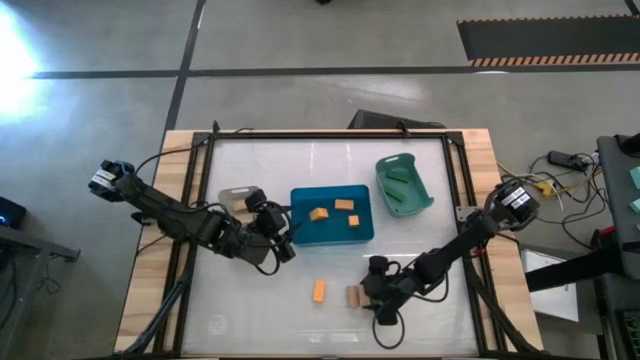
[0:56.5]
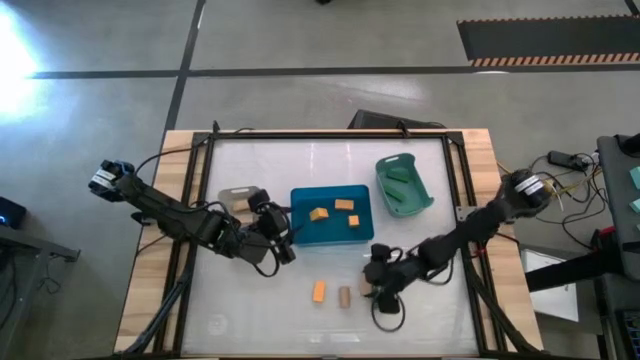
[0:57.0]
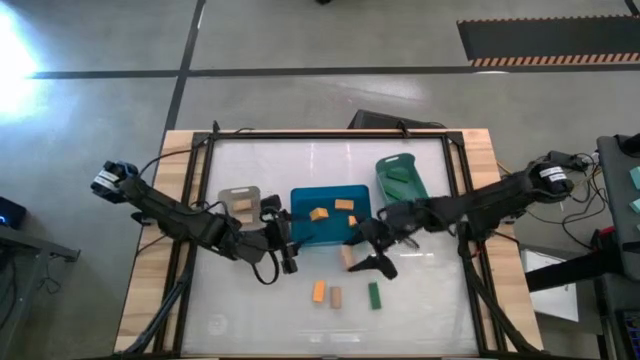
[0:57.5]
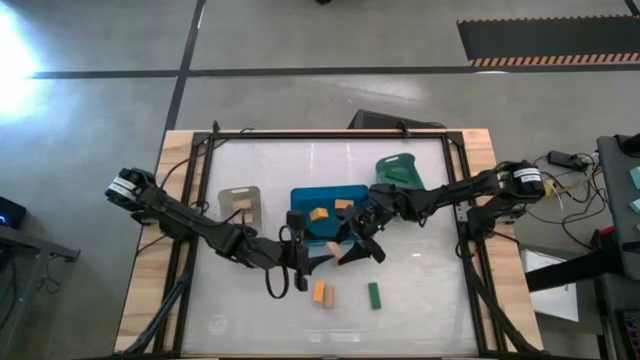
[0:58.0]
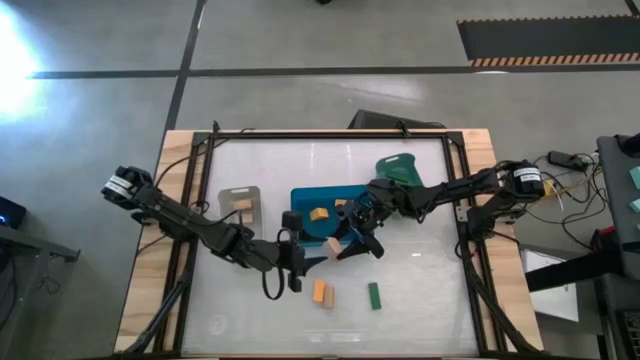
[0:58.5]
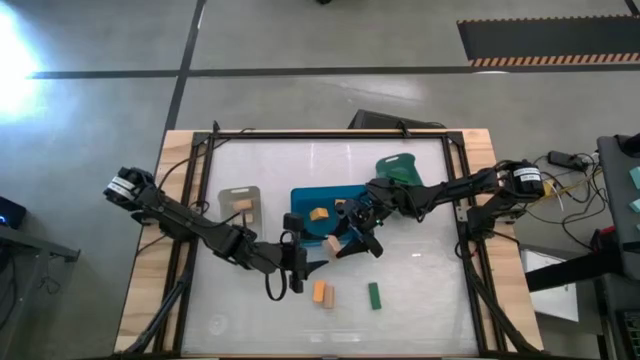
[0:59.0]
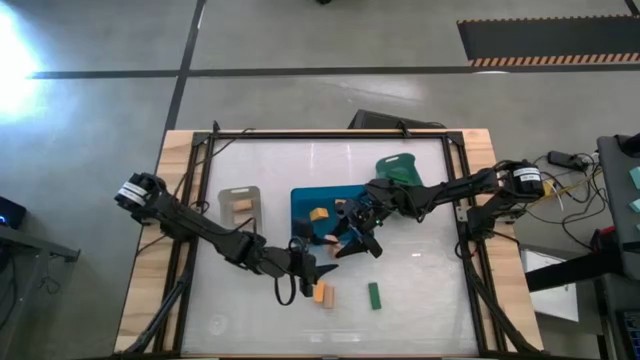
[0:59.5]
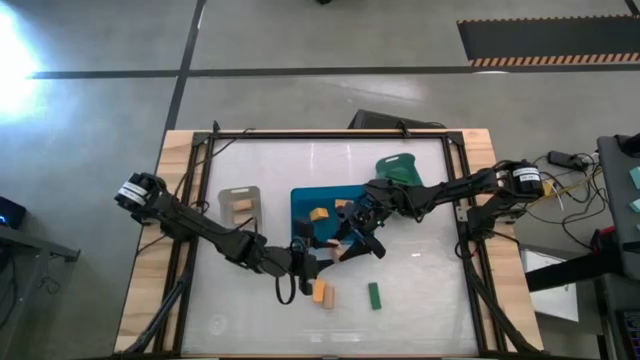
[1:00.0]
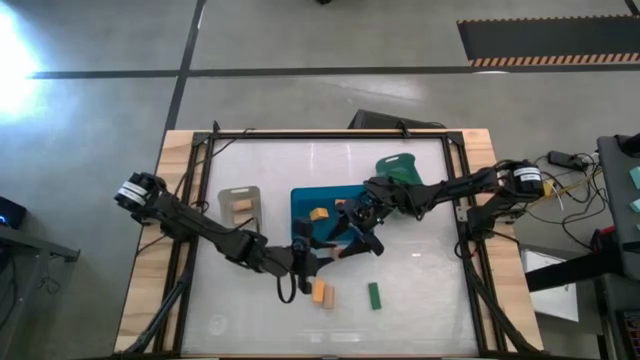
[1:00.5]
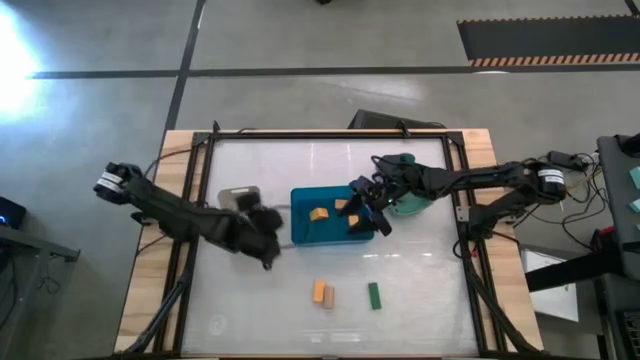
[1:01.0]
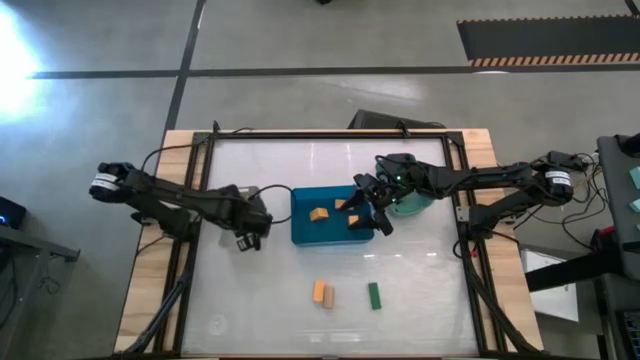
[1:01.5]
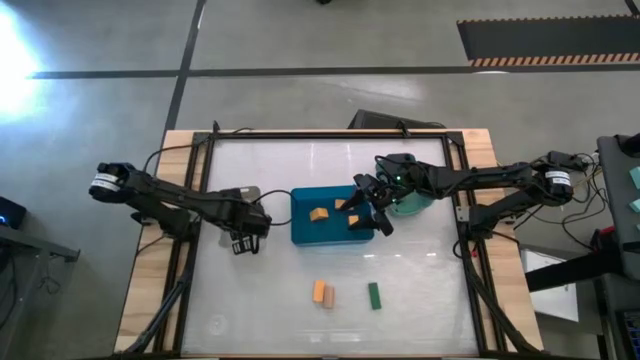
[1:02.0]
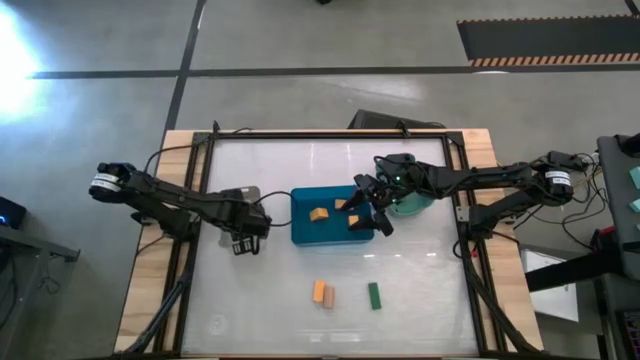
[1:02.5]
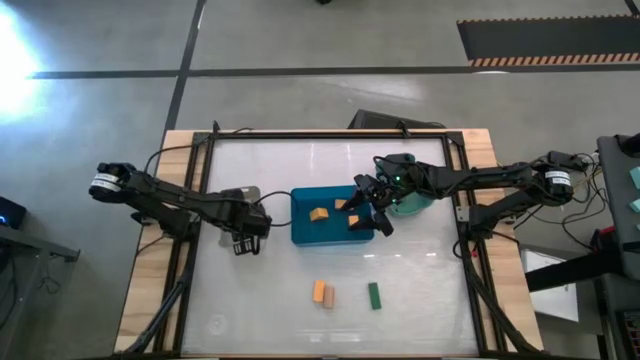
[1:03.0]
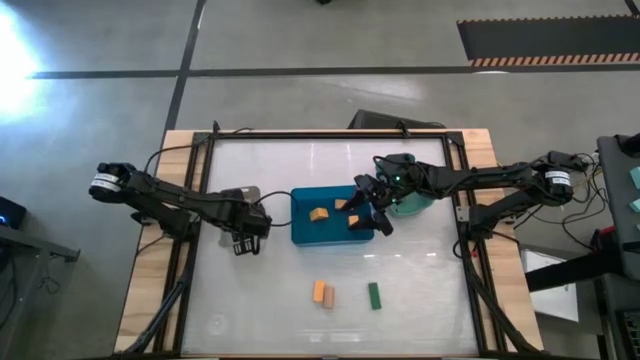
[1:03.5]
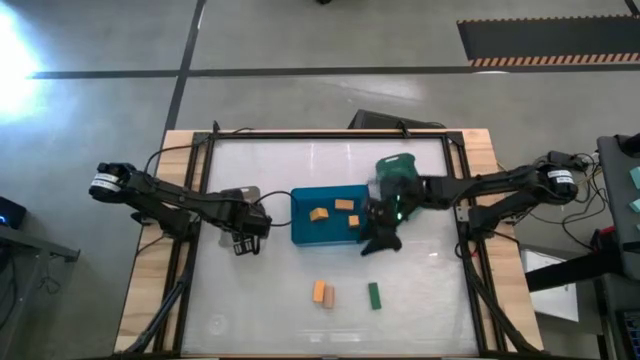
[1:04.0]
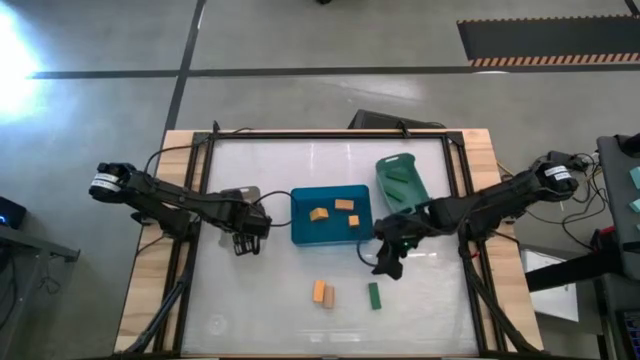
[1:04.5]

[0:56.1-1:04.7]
Task: Sort & place blocks by color
Put the brown block into the gray bin

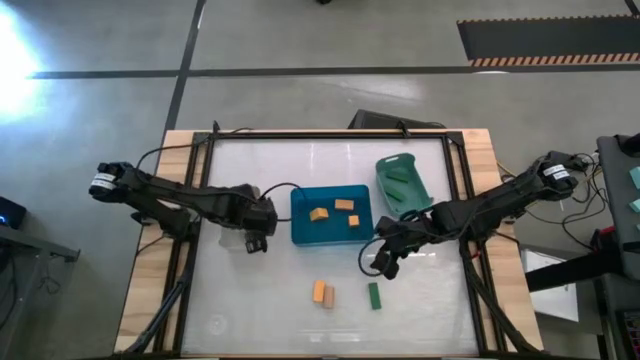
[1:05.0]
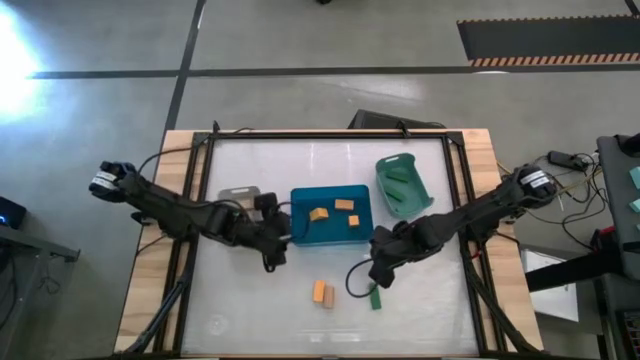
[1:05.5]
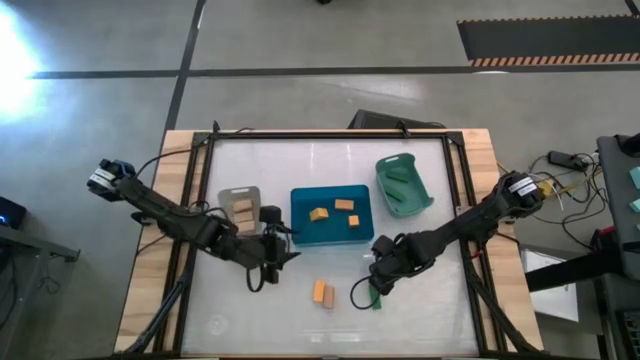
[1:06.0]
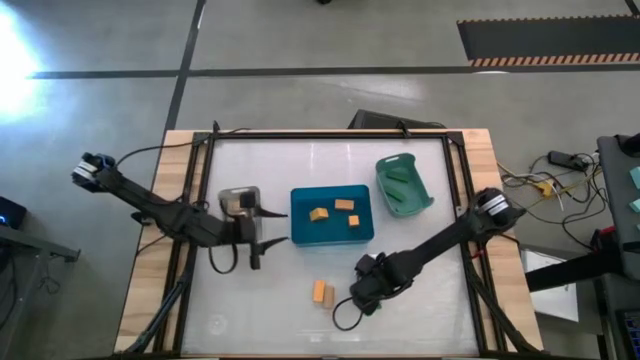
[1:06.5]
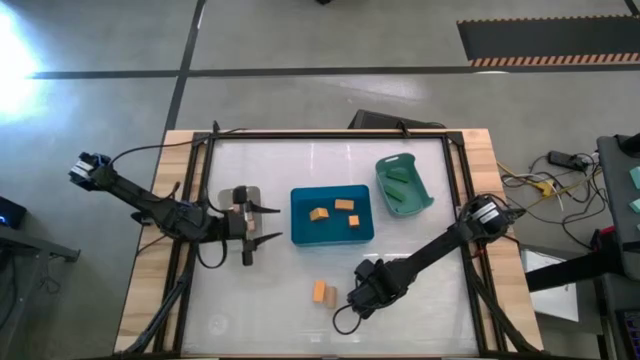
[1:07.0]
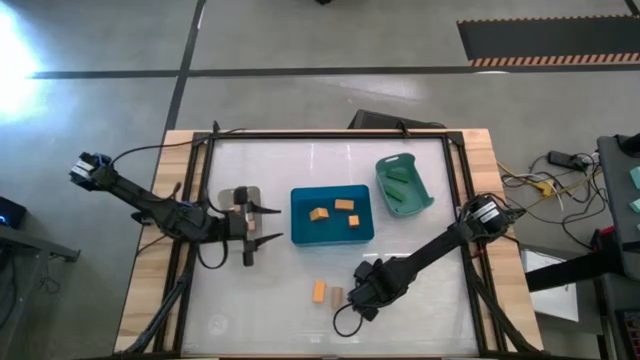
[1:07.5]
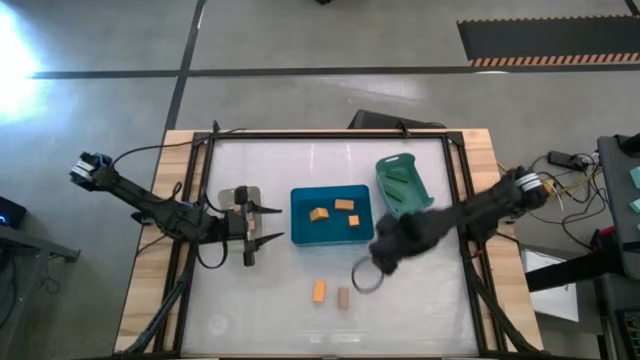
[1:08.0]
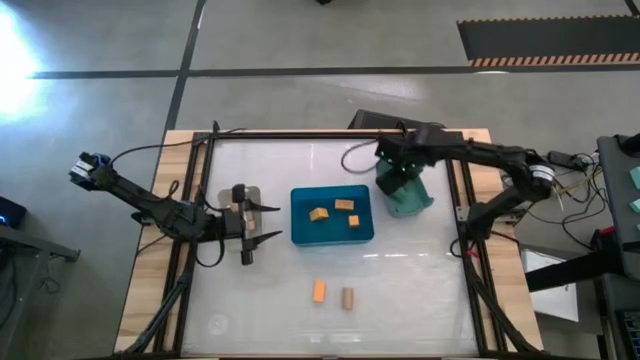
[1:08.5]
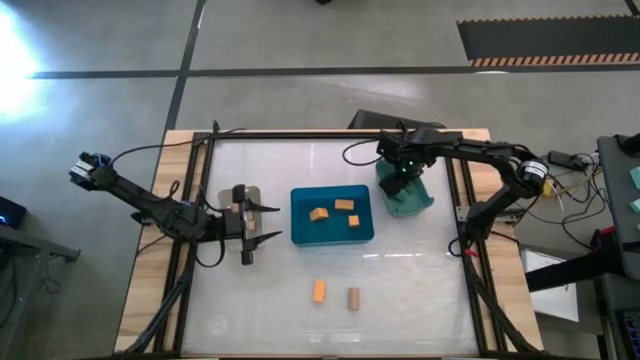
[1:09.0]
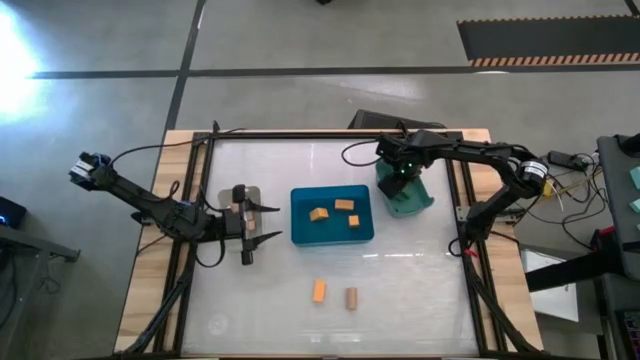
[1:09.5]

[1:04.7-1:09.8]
Put the green block into the teal bin

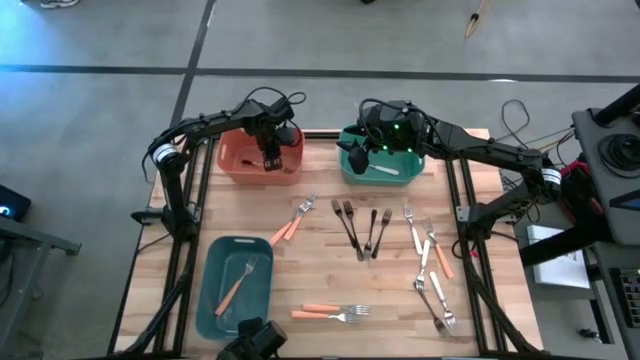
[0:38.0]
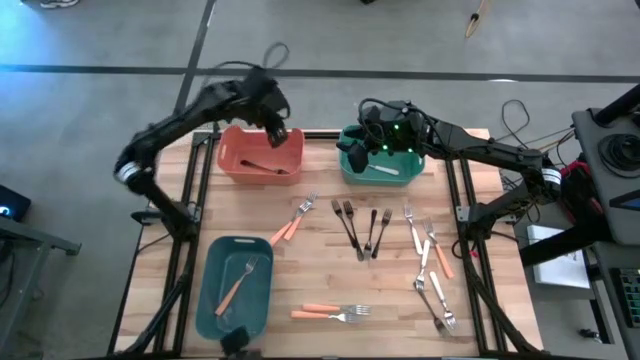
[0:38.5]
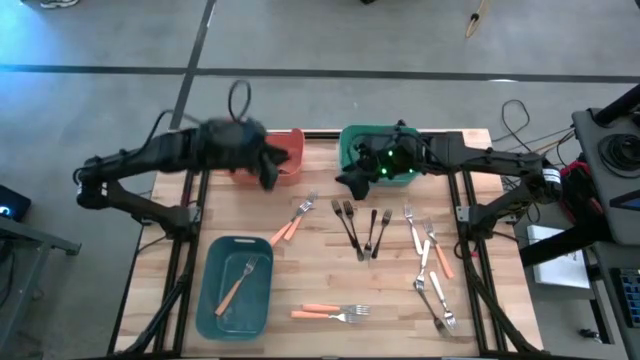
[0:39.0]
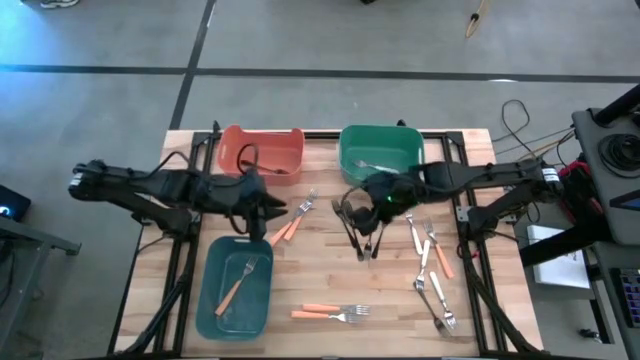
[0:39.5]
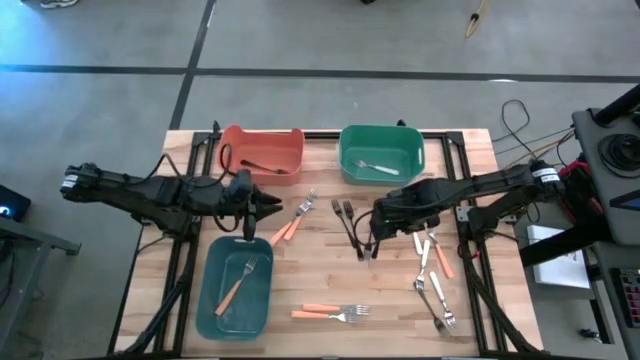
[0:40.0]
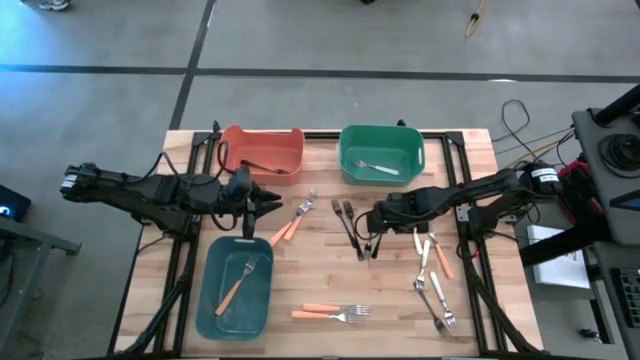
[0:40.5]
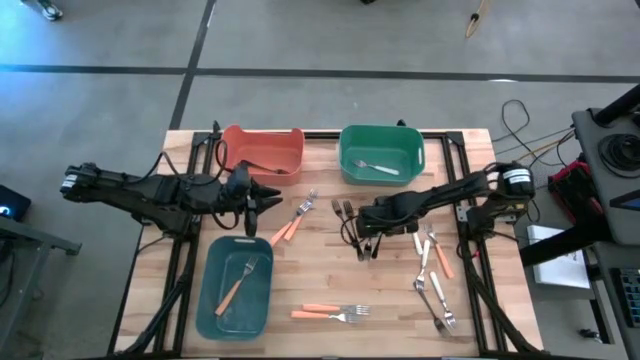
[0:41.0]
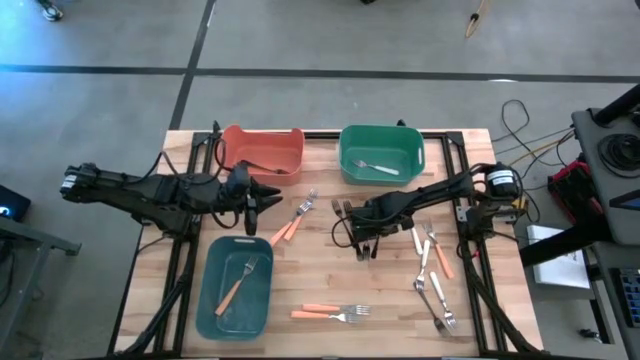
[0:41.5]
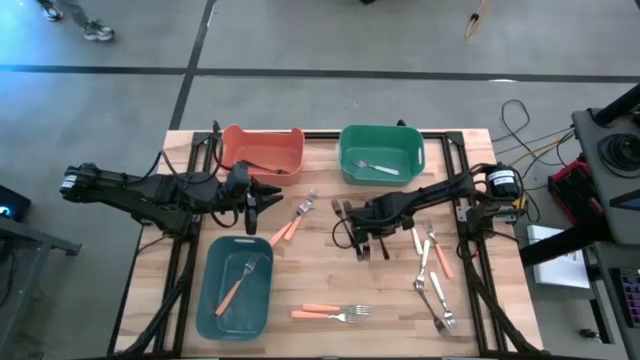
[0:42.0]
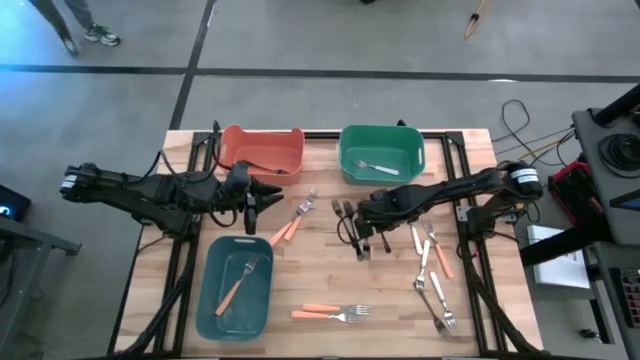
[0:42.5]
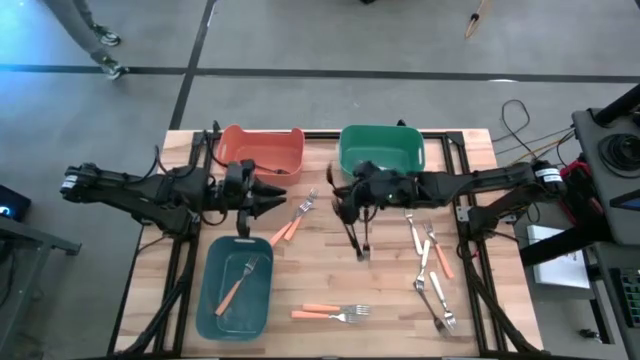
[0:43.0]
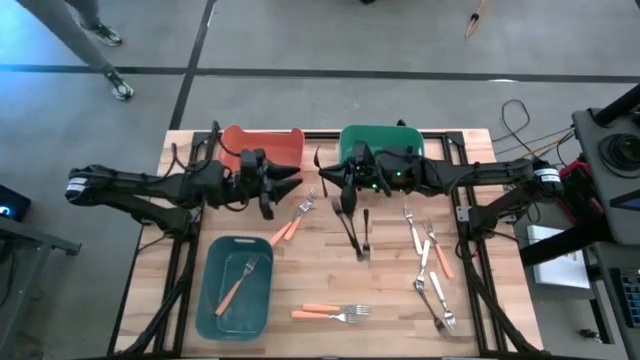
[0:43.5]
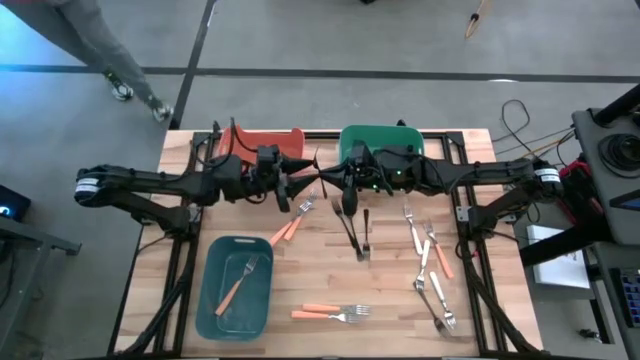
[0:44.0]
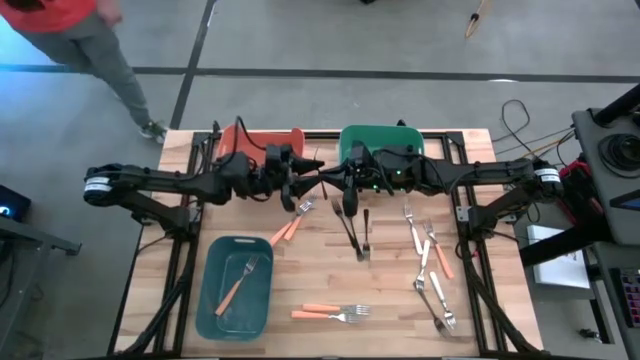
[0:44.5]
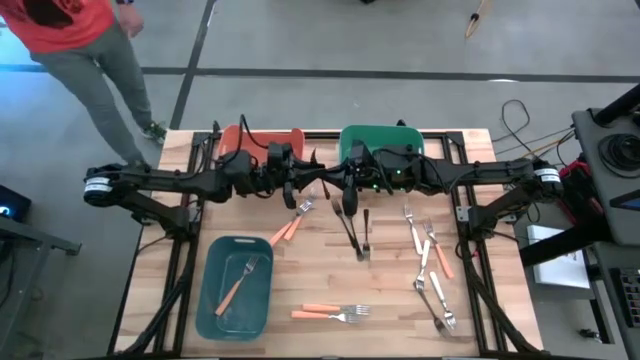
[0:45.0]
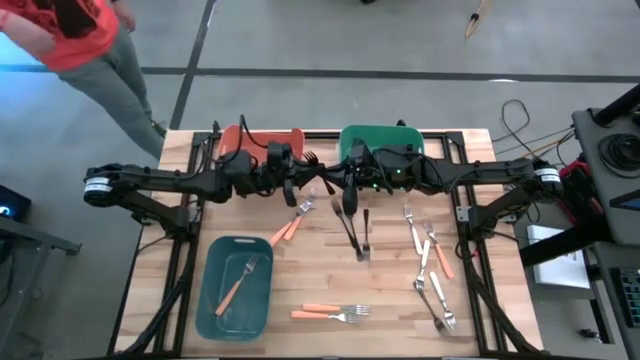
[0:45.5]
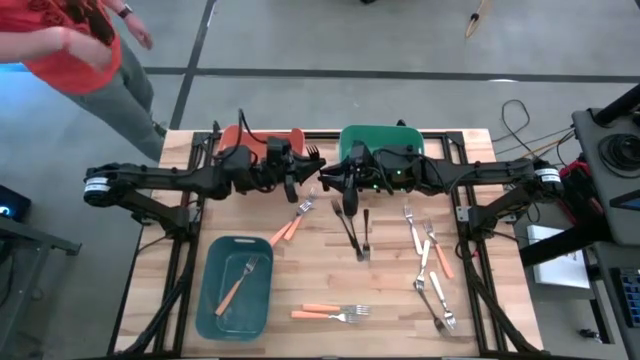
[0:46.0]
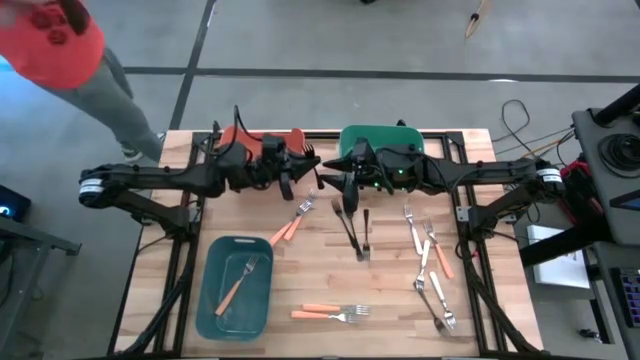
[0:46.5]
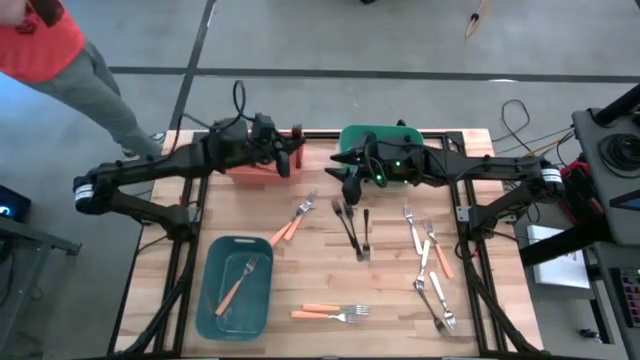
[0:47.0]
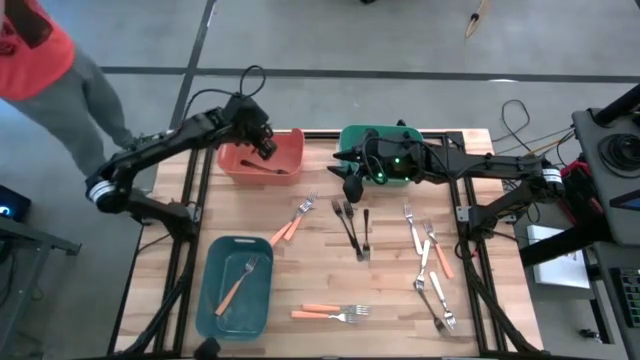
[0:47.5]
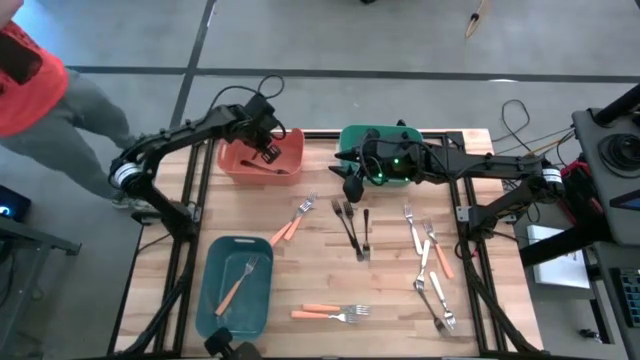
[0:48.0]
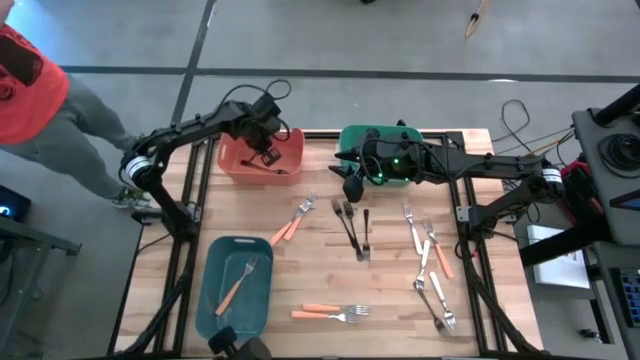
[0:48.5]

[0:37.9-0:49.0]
Task: Sort silverware by color (type)
Put the black fork into the orange bin
